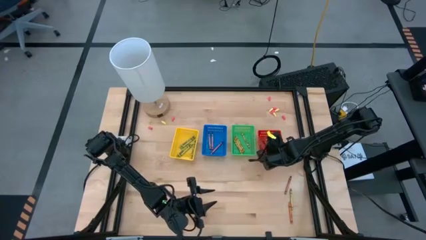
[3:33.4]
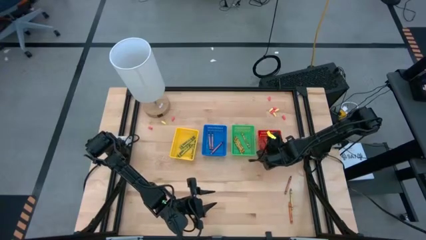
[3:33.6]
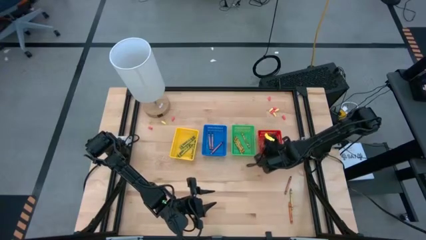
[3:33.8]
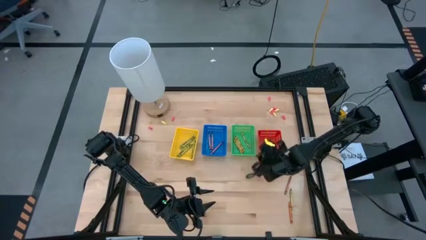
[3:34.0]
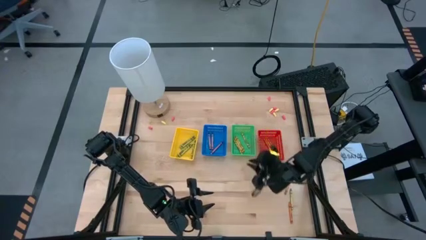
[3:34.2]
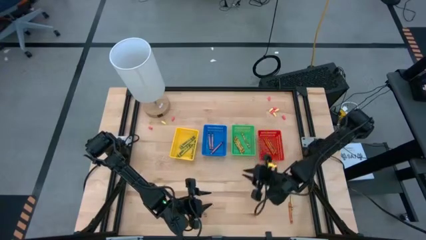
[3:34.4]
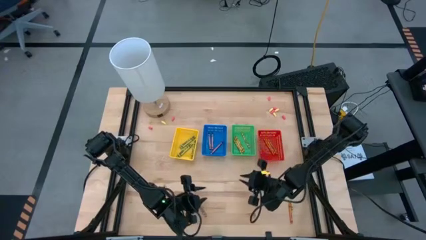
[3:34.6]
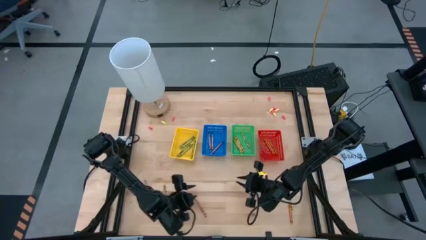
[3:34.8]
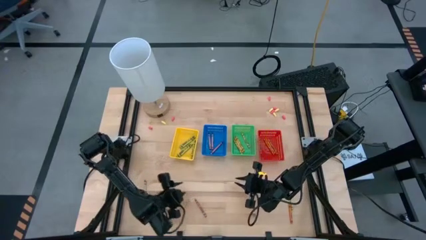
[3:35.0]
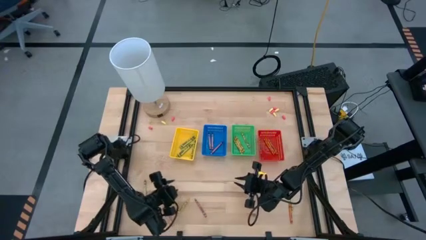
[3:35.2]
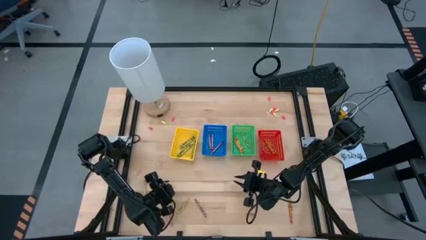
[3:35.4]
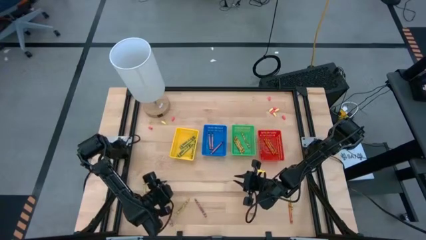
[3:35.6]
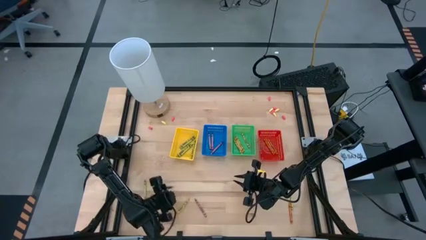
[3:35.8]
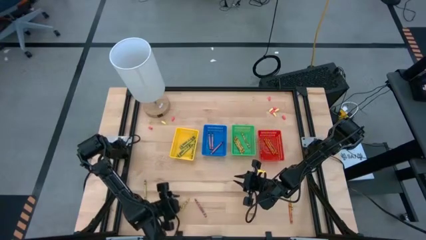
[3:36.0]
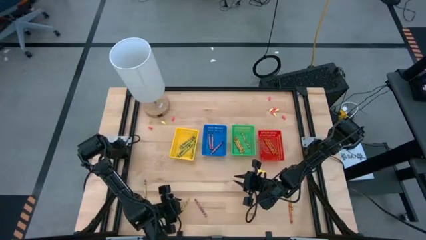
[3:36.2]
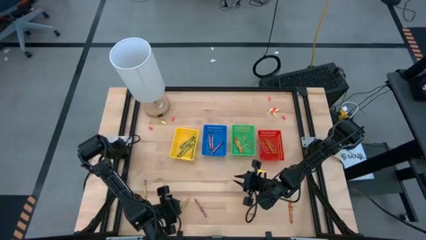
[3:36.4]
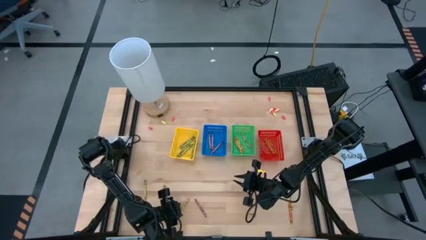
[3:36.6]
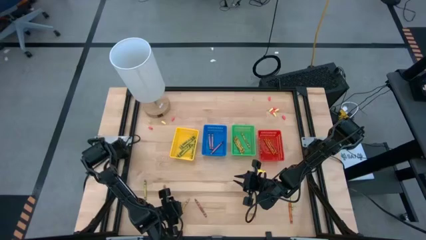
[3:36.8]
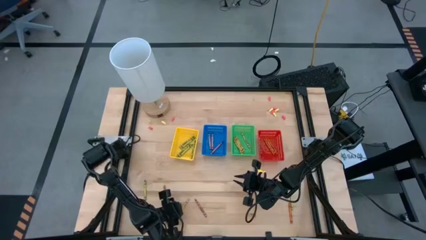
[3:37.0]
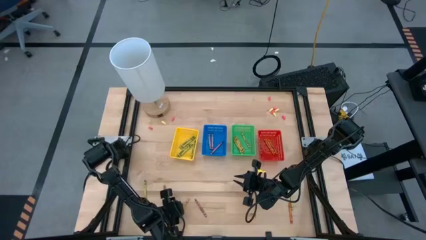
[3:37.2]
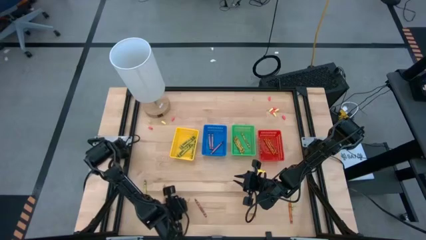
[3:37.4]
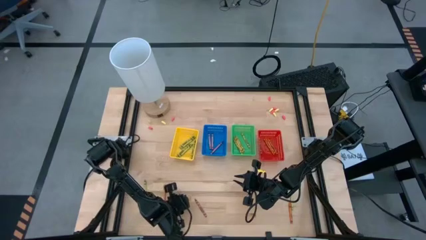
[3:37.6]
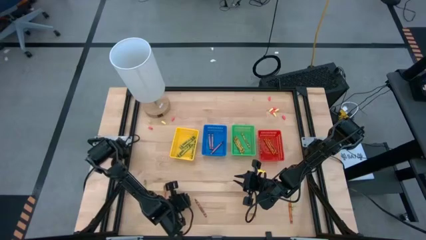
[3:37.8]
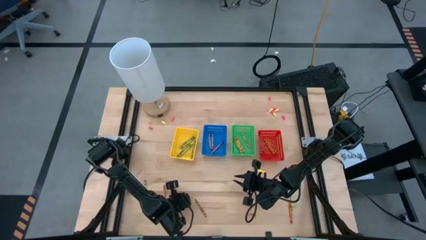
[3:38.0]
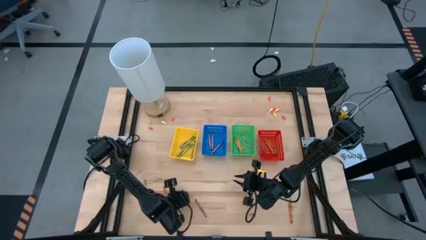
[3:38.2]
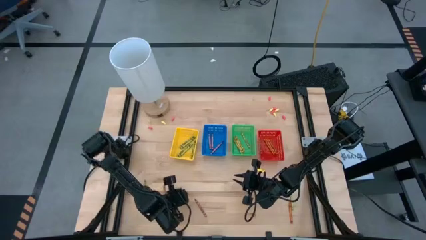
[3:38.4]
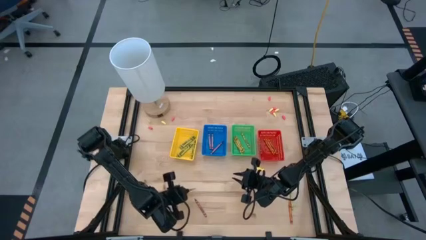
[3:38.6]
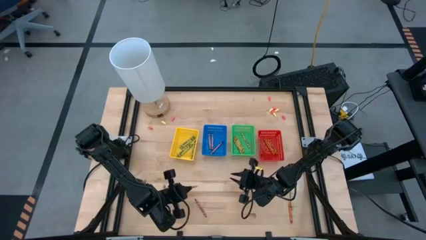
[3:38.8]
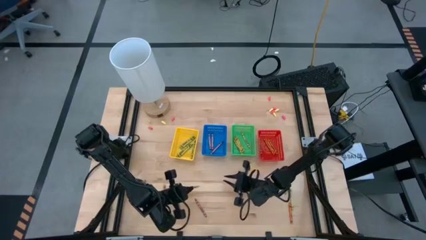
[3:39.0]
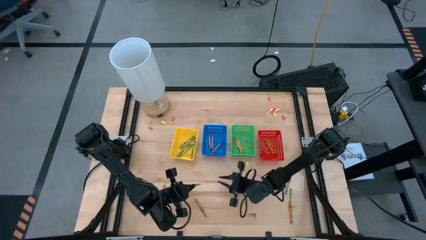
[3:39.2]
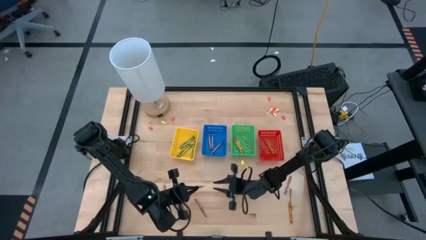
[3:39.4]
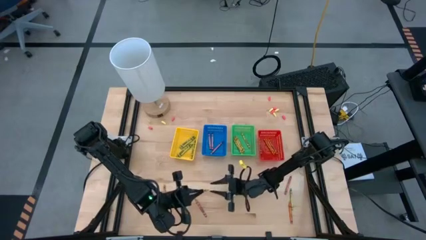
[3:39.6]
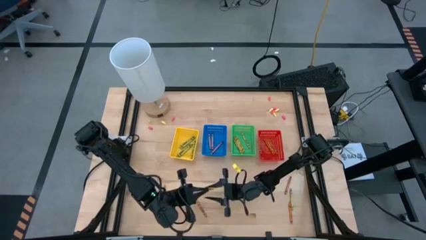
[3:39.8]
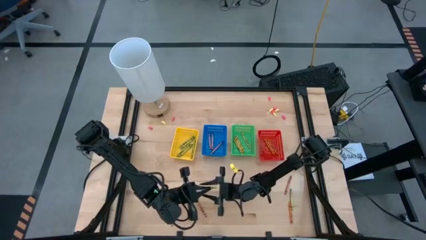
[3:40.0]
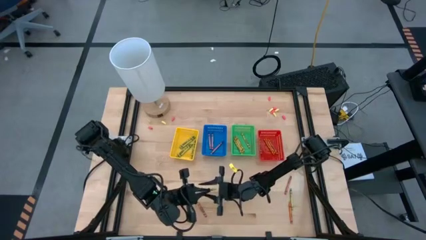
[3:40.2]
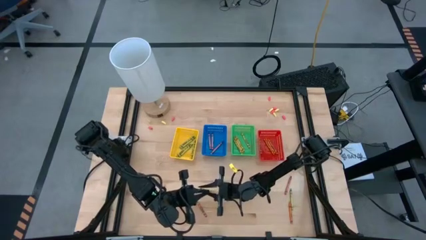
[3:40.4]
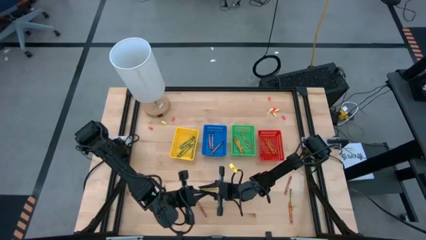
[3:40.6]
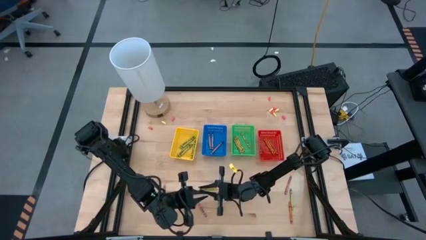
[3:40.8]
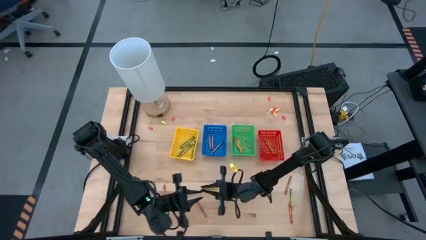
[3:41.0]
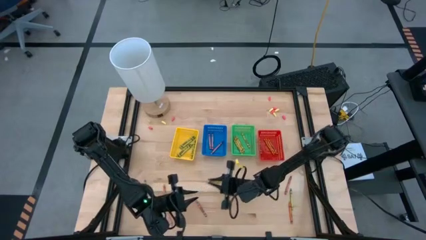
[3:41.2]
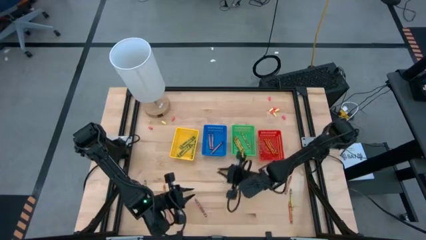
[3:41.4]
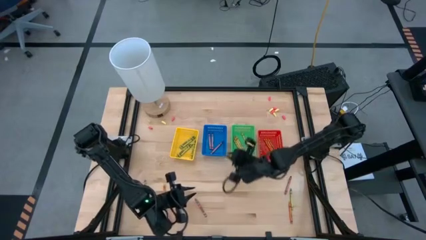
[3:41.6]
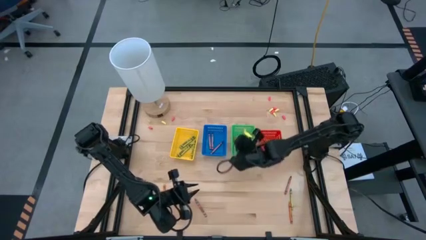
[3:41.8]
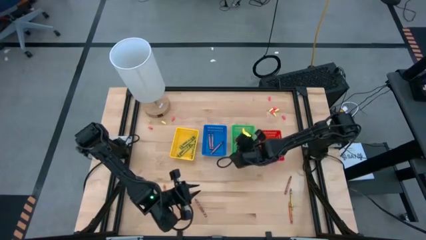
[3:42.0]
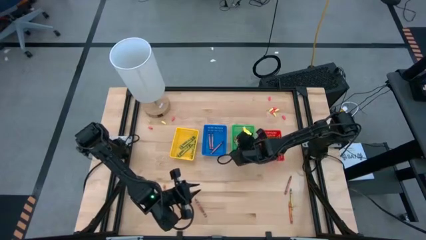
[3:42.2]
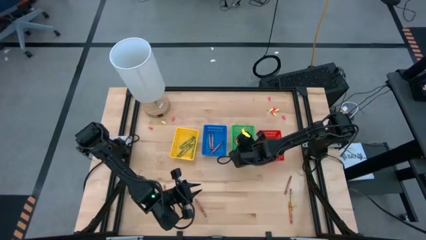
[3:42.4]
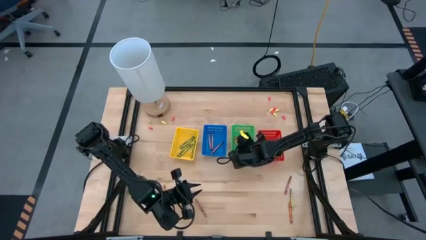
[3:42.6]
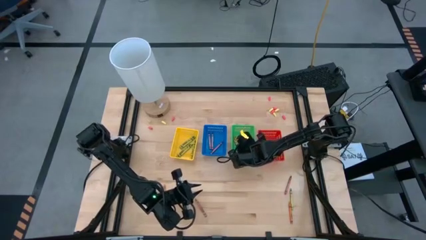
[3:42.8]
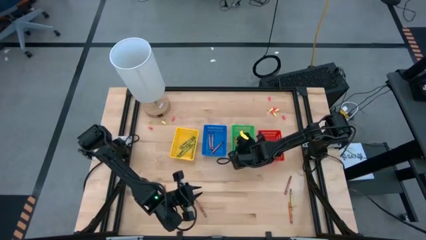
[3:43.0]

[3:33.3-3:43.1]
Task: Sort crayons
Put the yellow crayon into the green bin

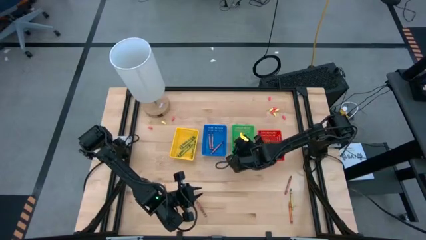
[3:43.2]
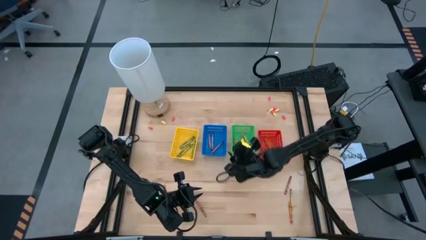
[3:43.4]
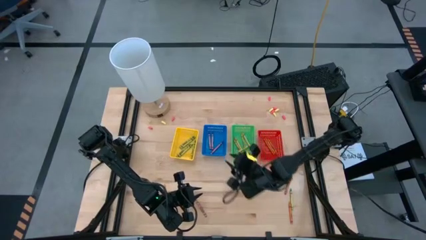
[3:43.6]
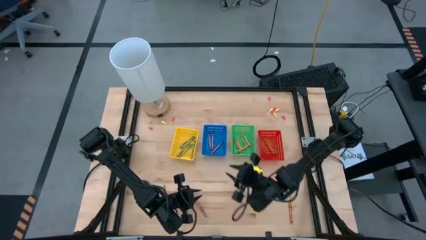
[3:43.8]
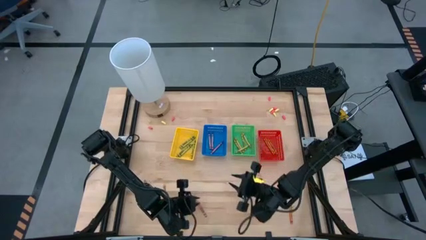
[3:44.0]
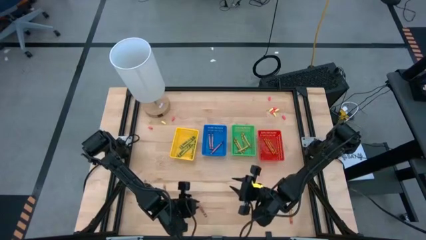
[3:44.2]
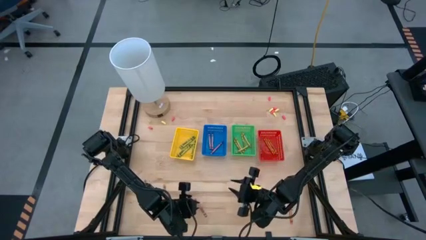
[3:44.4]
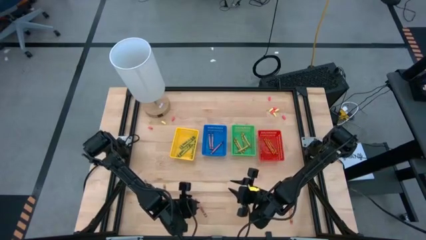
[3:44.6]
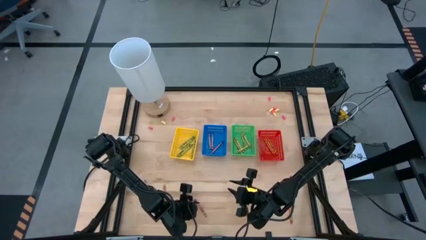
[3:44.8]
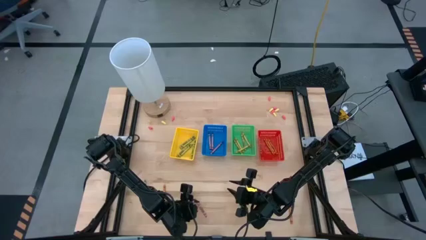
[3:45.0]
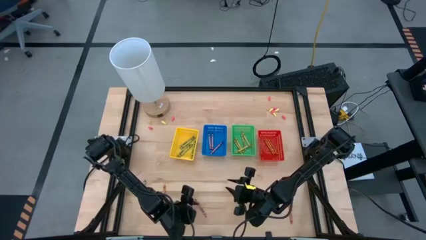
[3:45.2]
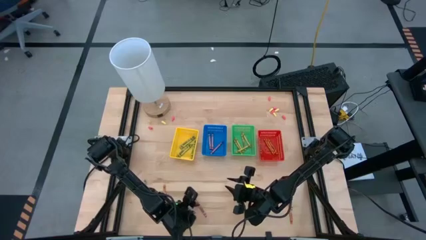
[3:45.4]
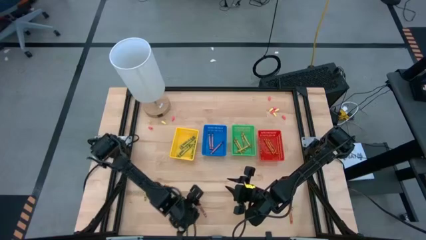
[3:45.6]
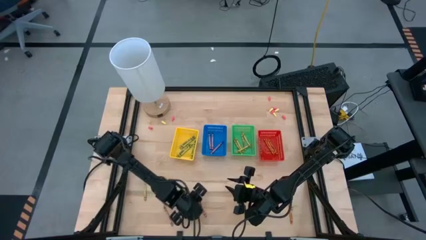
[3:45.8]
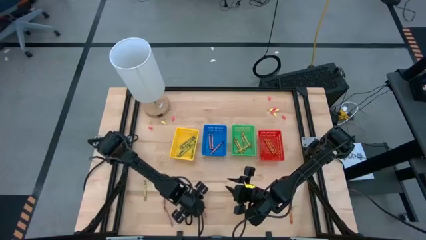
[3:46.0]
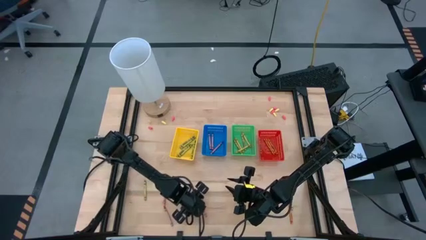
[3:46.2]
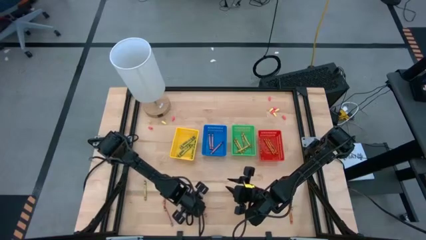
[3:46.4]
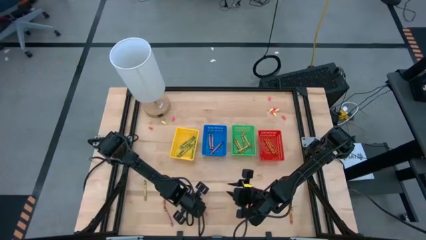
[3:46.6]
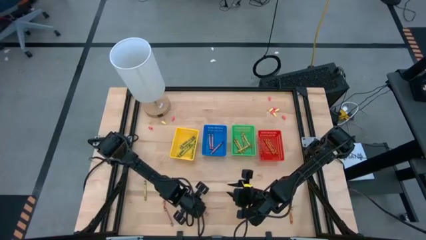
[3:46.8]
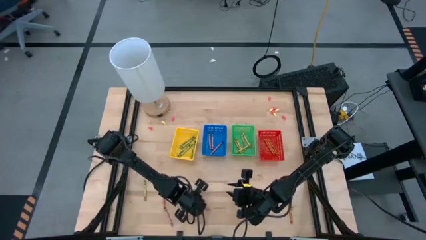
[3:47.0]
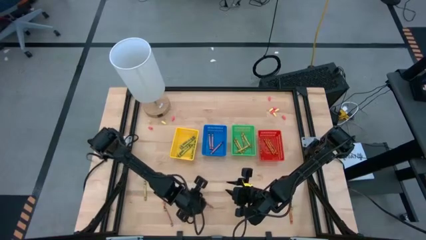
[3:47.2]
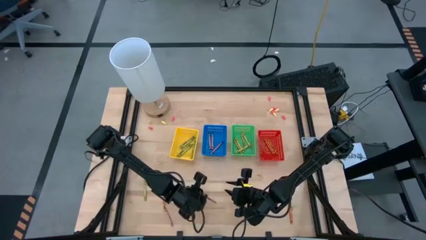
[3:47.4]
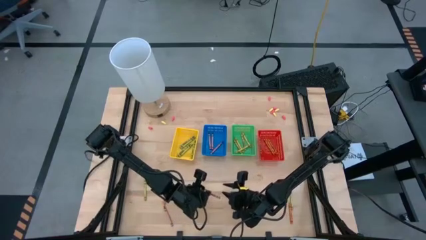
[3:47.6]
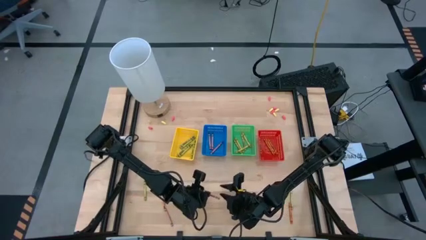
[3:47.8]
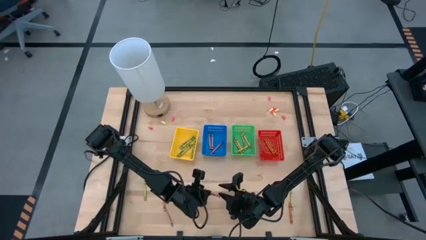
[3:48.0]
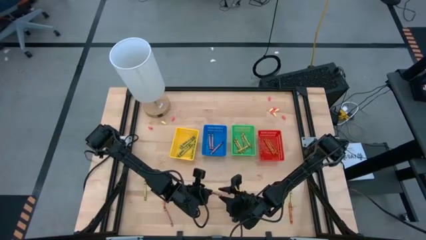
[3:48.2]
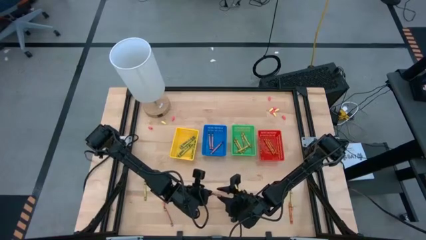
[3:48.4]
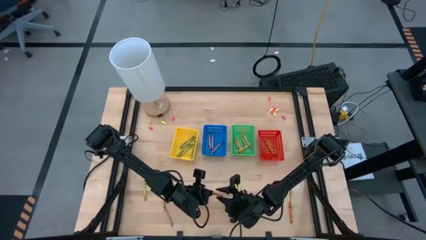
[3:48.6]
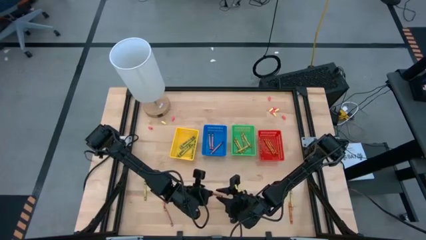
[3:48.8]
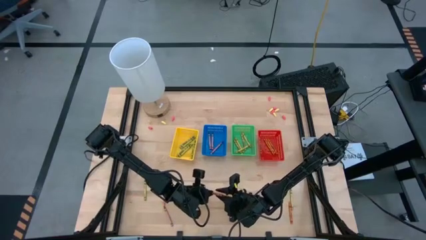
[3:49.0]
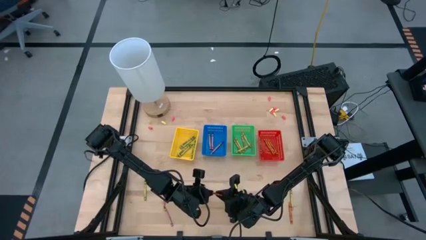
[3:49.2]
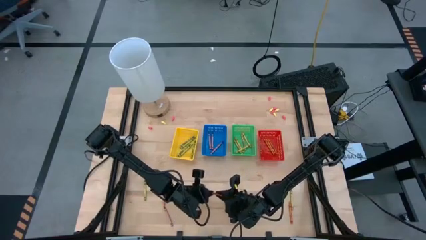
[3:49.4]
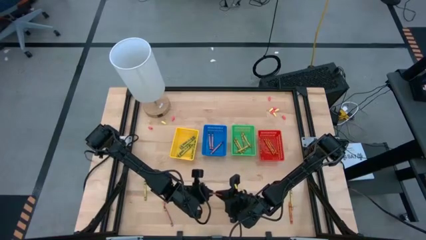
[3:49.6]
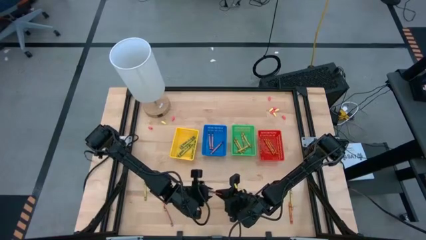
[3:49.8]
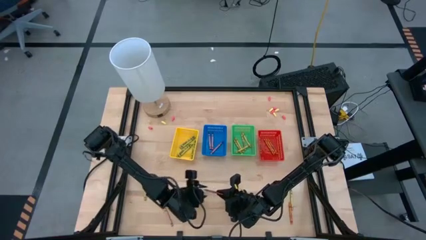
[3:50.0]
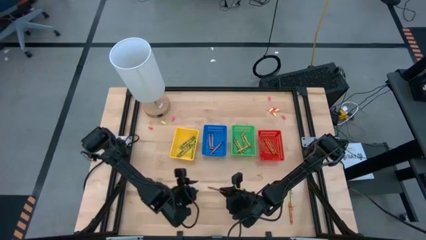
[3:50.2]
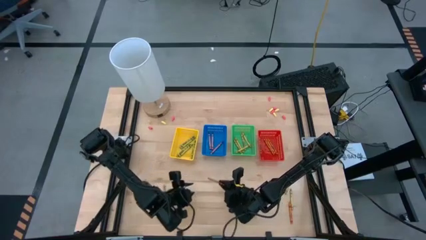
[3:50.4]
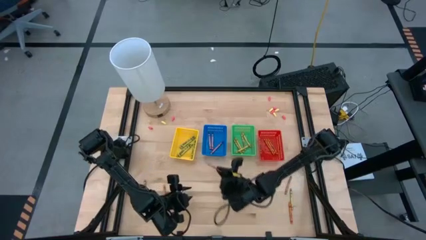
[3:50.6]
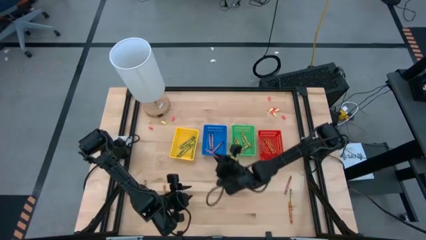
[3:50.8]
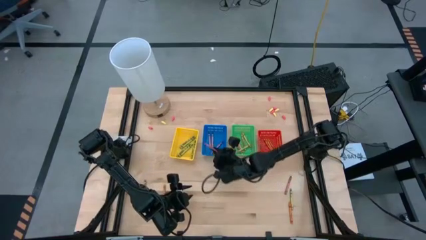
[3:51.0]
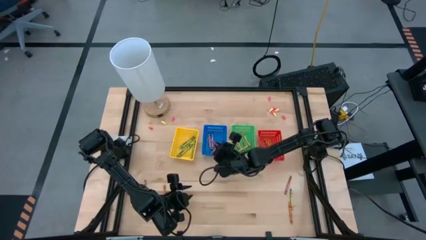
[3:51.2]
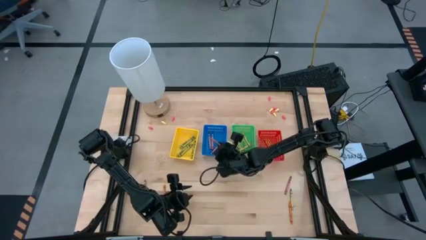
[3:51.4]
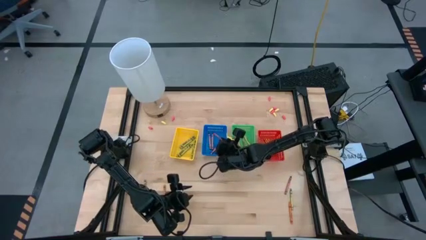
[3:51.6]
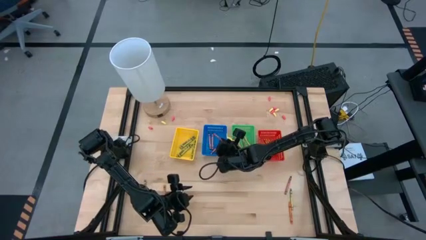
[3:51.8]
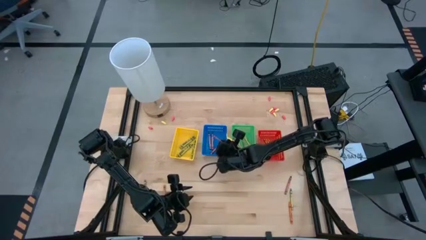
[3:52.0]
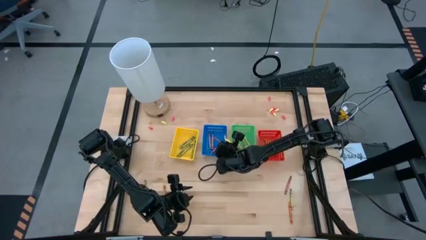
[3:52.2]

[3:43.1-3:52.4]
Put the red crayon into the blue bin
